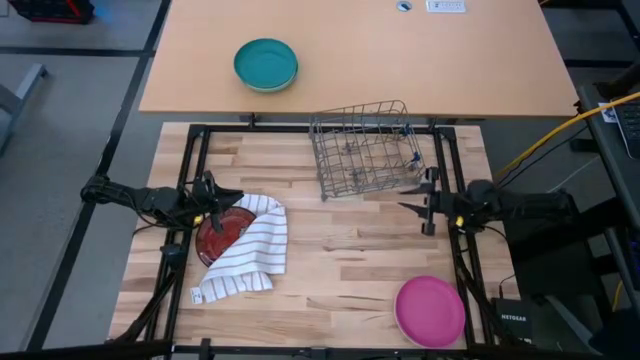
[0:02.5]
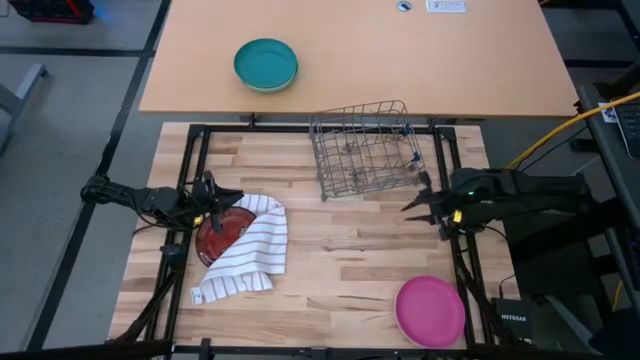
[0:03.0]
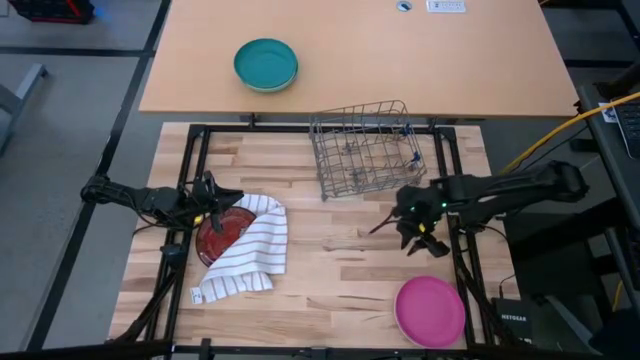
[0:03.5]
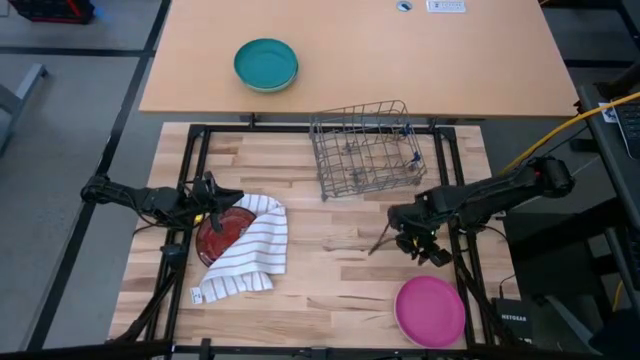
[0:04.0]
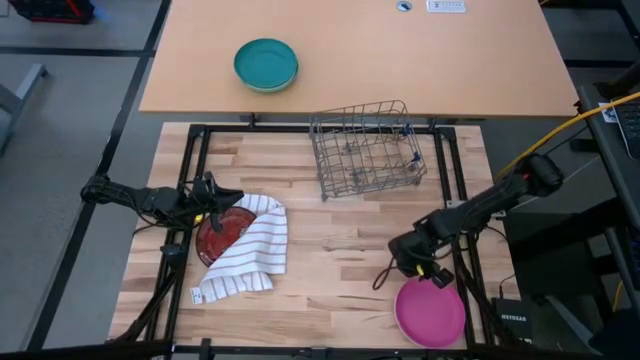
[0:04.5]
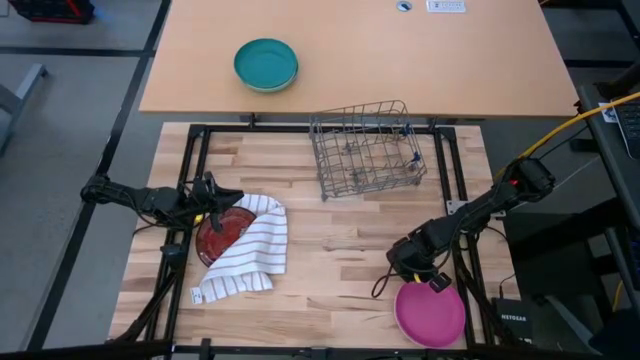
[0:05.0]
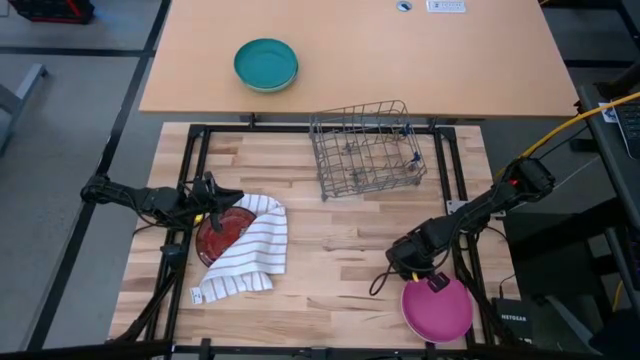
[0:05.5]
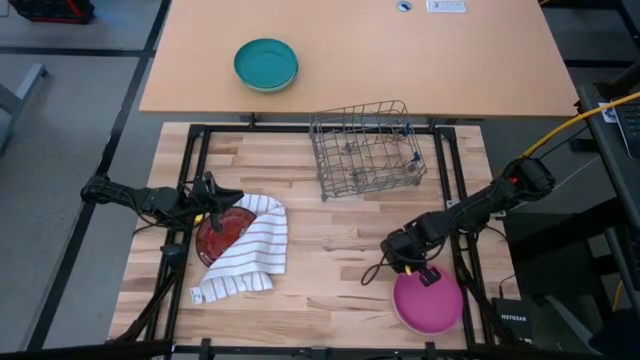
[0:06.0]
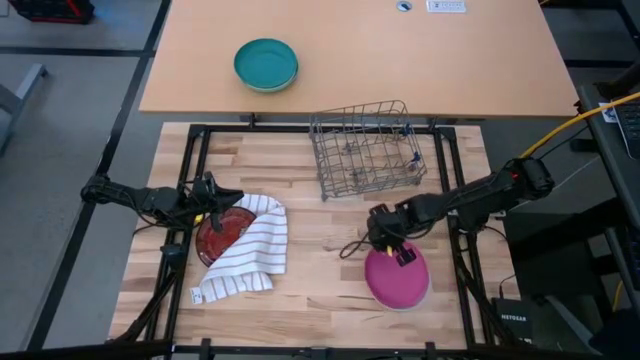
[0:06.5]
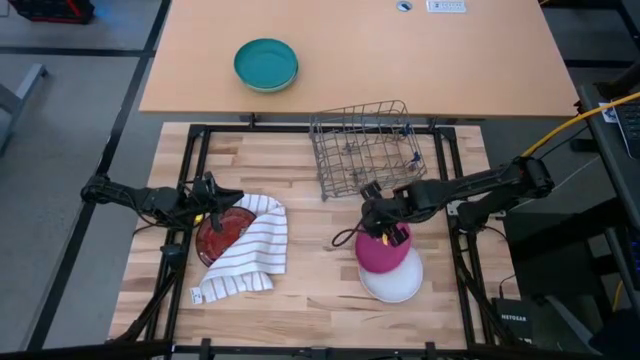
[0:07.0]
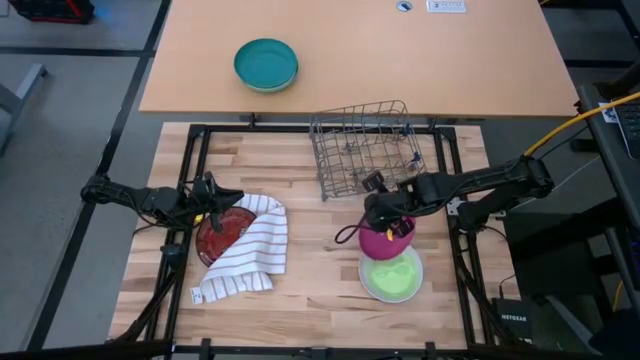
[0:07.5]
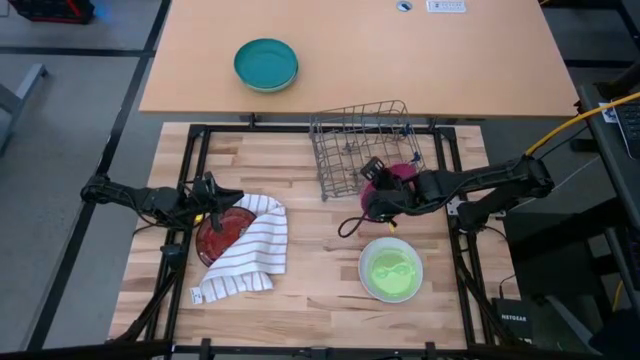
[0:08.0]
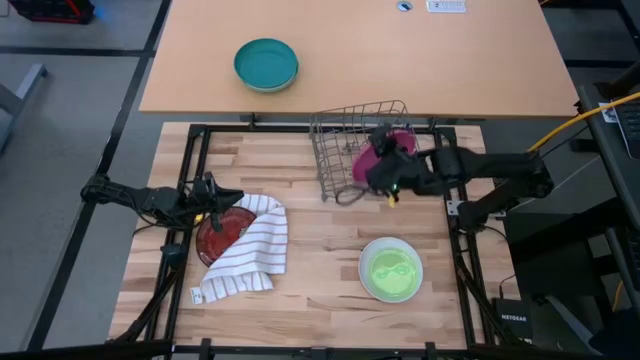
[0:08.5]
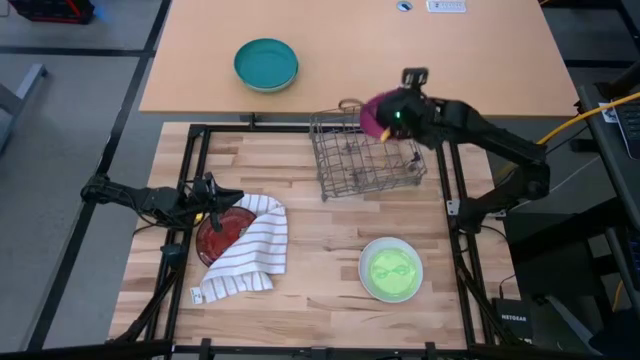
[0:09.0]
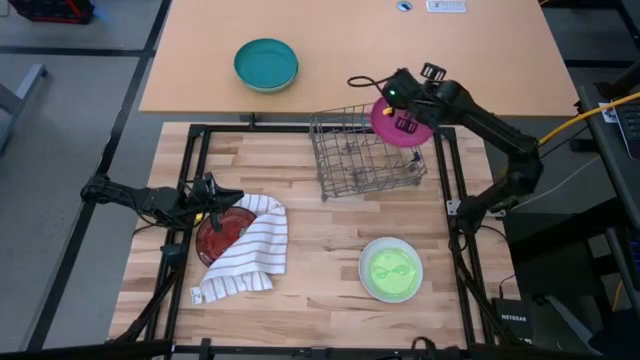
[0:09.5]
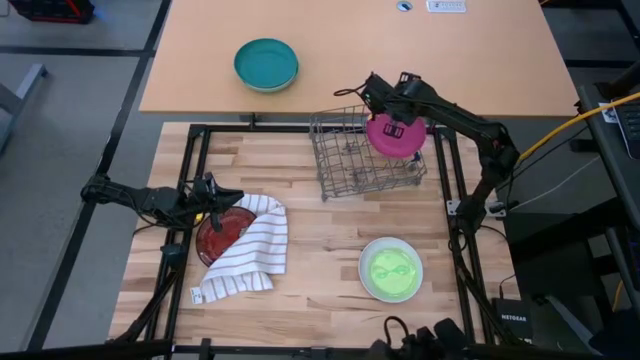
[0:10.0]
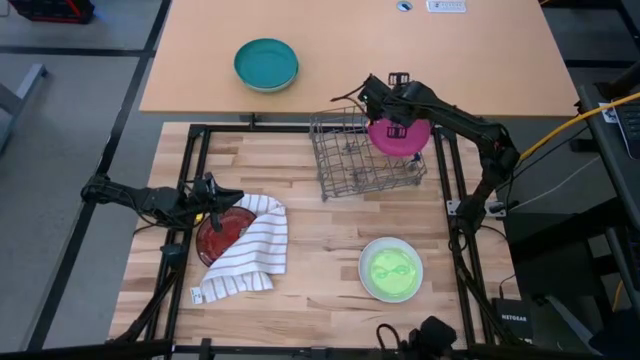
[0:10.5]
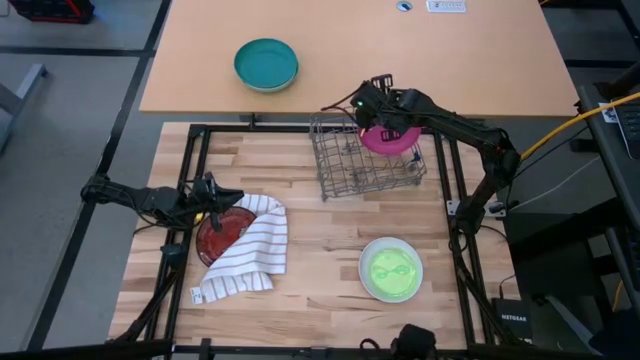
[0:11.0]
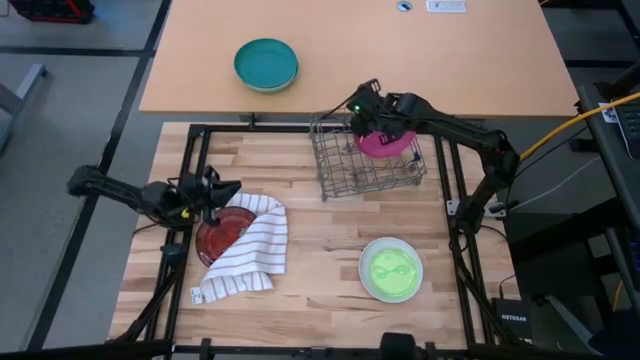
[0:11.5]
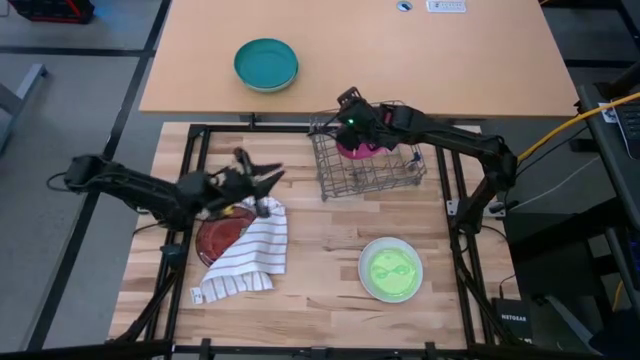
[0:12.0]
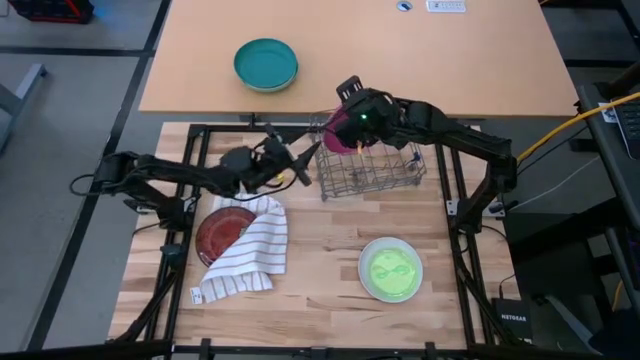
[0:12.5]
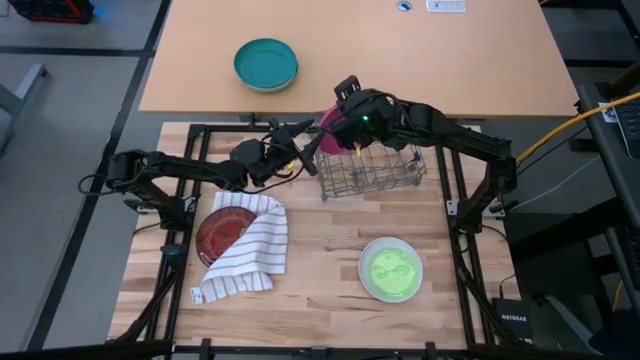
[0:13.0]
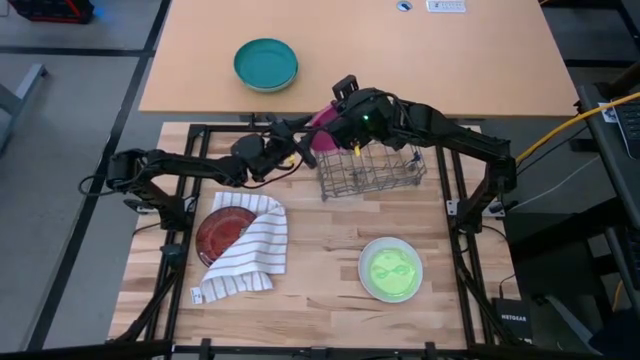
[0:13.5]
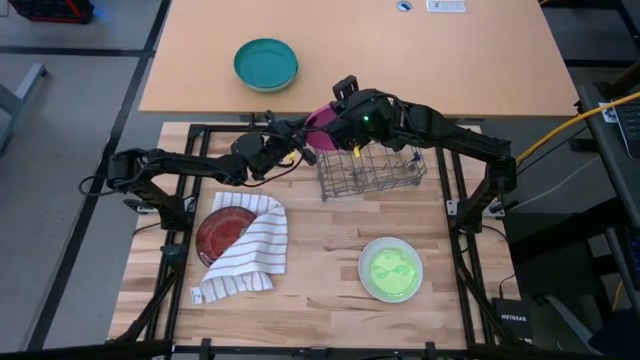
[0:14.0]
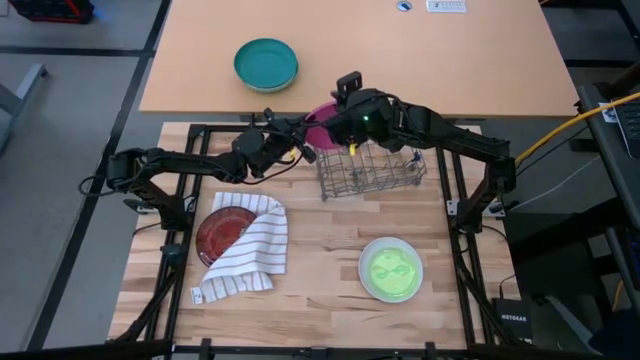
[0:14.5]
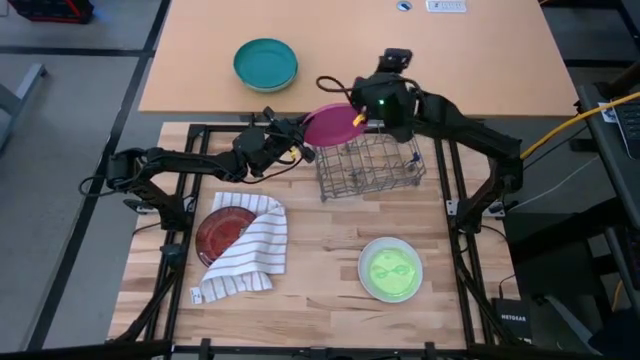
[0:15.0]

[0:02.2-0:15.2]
Task: Sort dishes
Put the pink plate in the dish rack

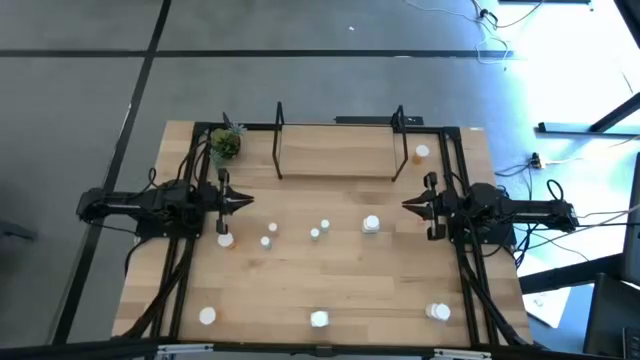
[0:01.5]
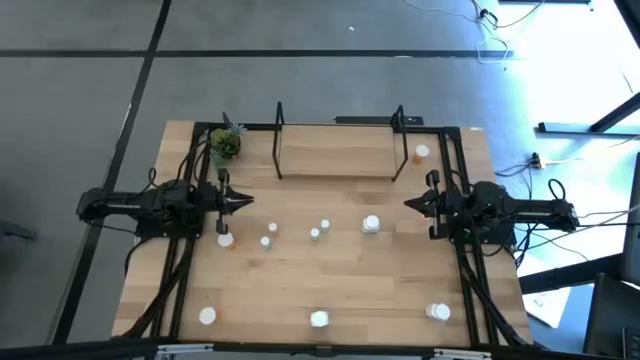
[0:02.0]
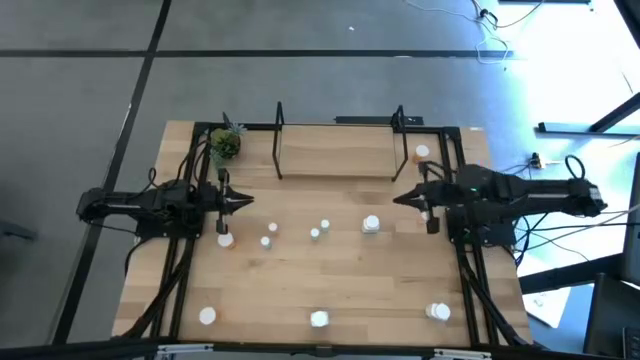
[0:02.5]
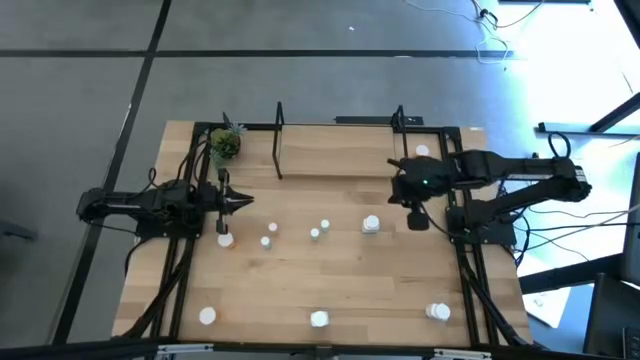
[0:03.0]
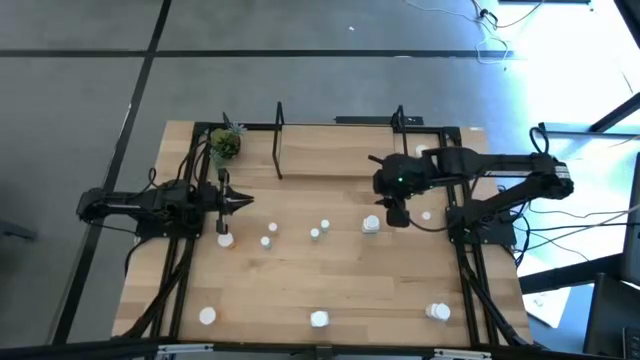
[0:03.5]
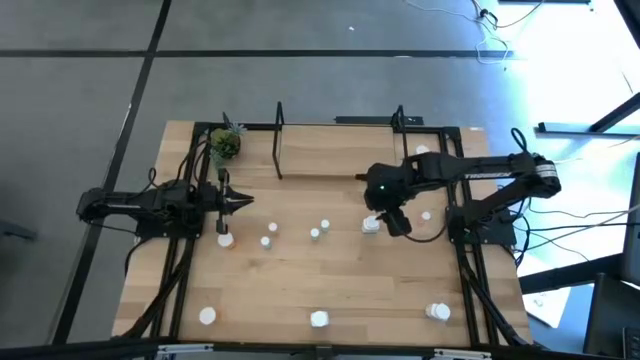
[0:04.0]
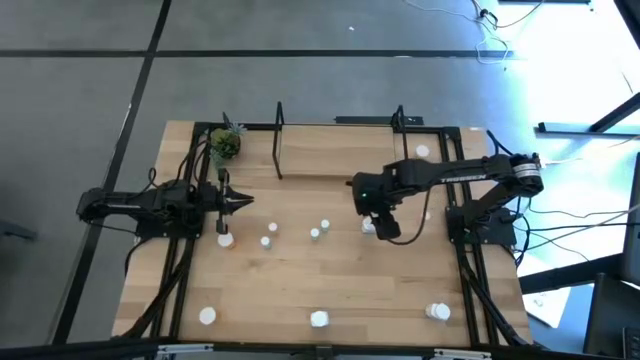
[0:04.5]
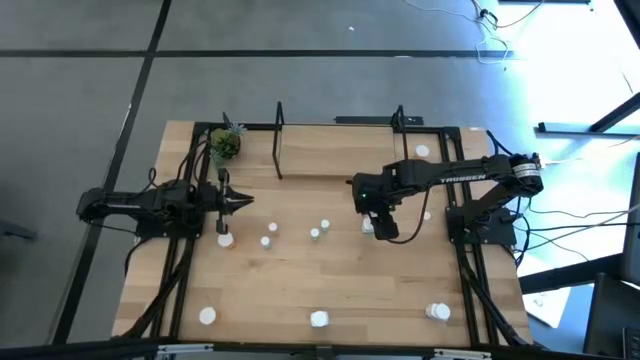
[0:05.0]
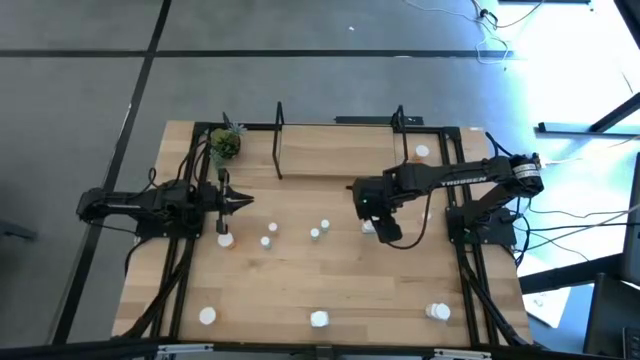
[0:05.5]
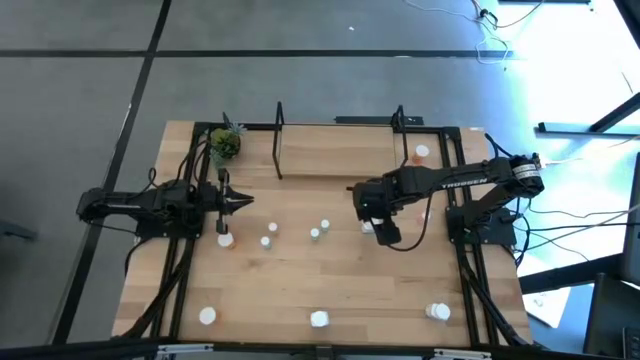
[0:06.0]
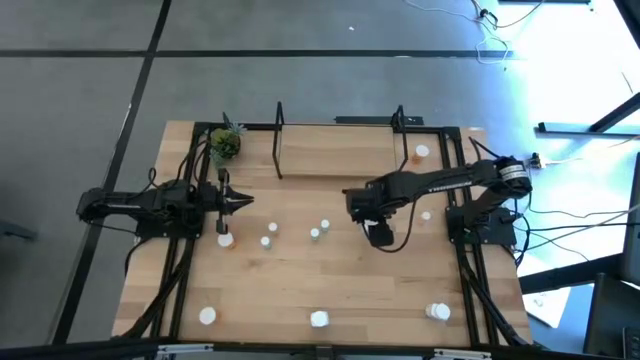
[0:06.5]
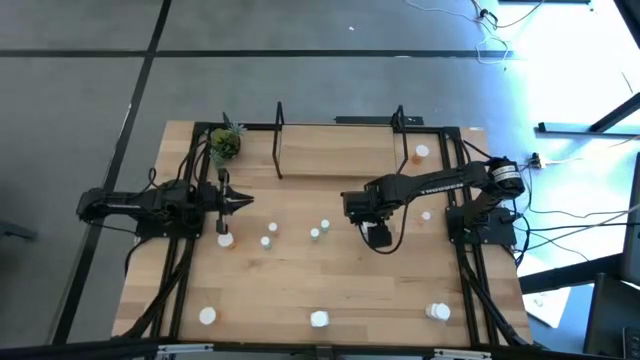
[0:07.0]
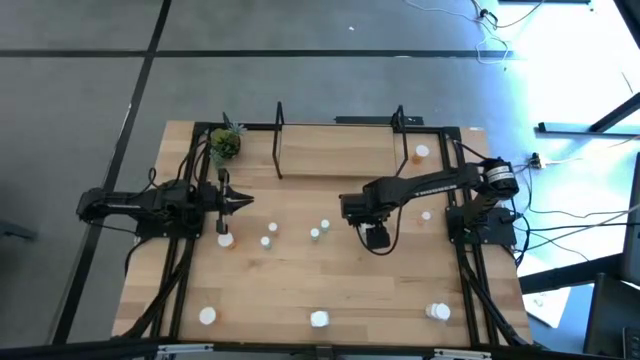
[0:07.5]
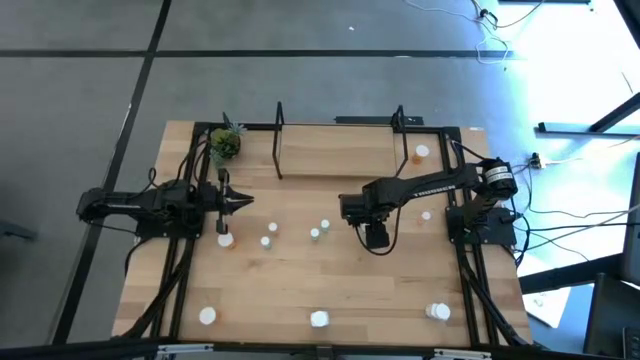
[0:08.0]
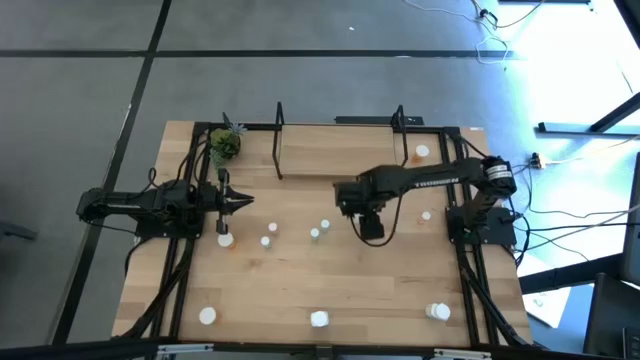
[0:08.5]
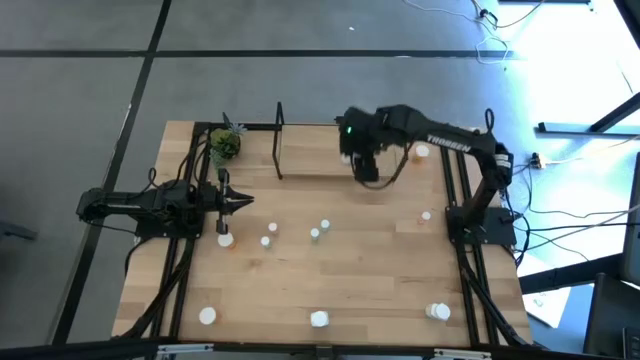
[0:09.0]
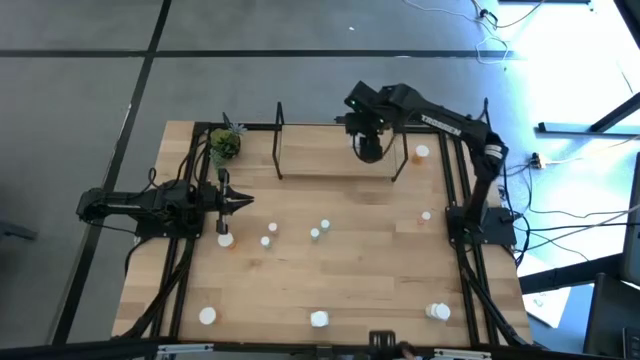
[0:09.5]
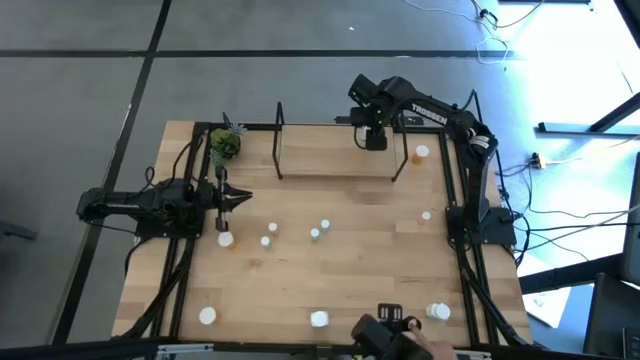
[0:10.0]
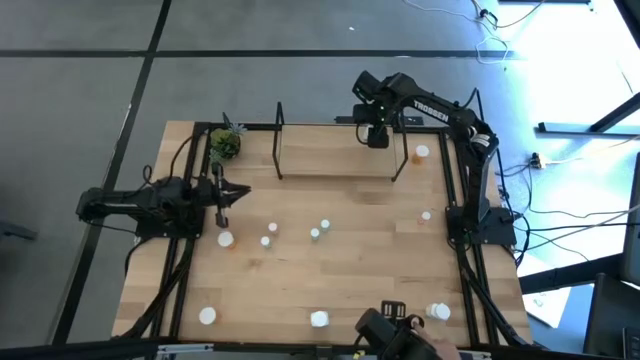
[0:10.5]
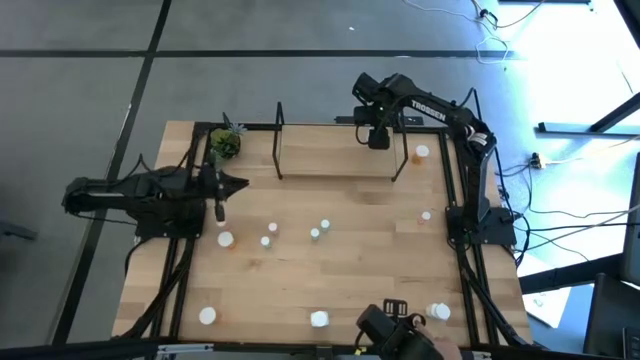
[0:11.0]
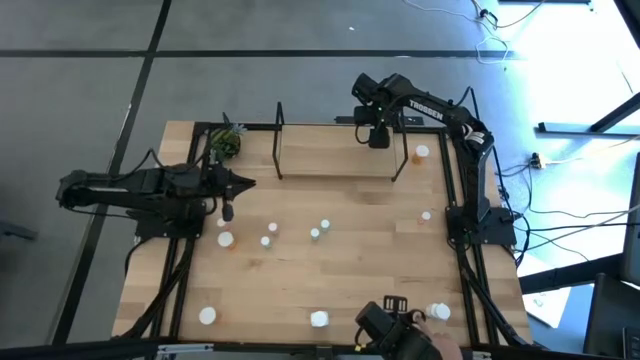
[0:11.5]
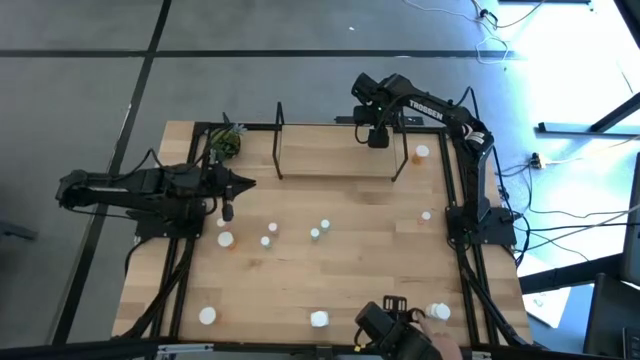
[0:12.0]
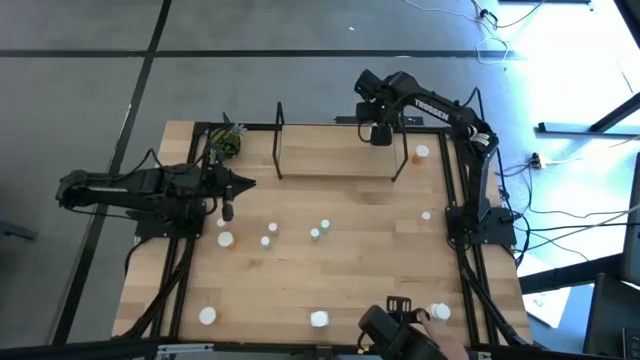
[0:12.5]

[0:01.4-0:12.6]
Task: Pick and place medicine bottles onto shelf by color
Put the top white pill bottle on the shelf
